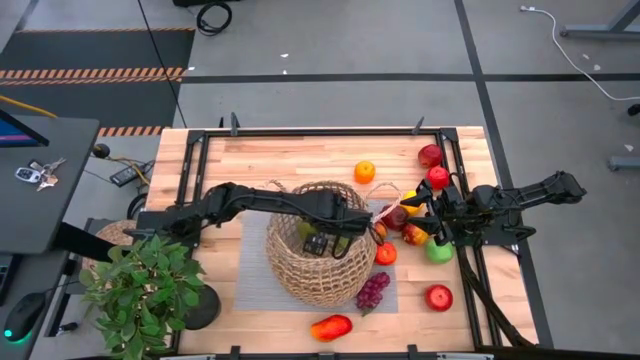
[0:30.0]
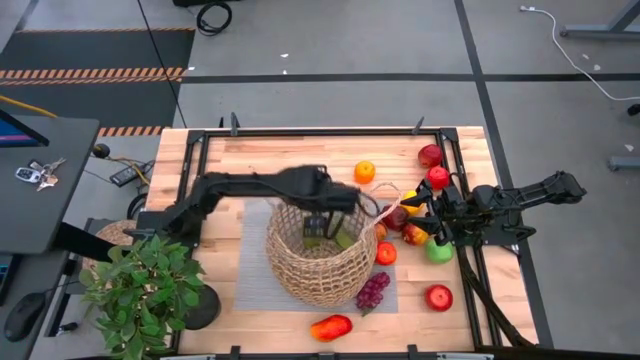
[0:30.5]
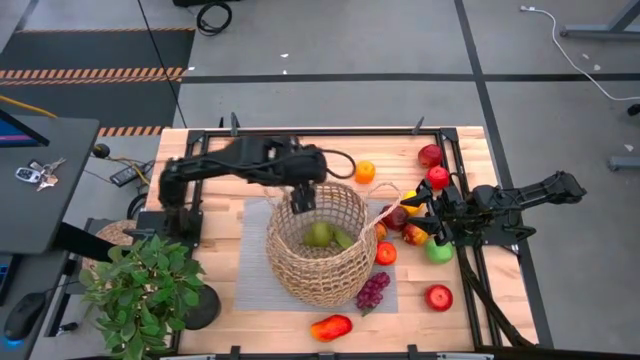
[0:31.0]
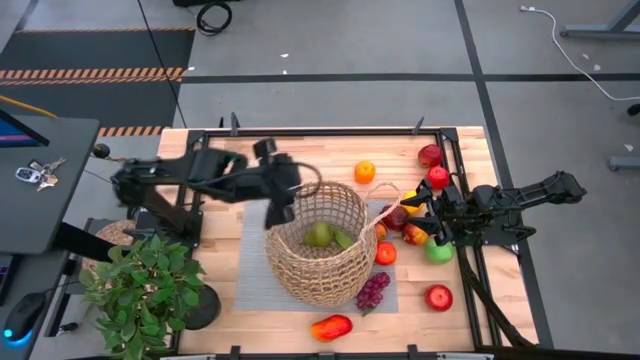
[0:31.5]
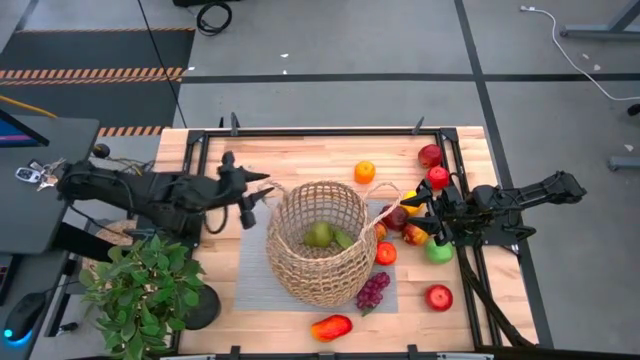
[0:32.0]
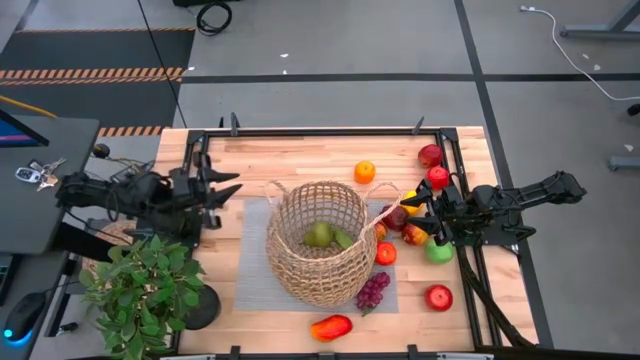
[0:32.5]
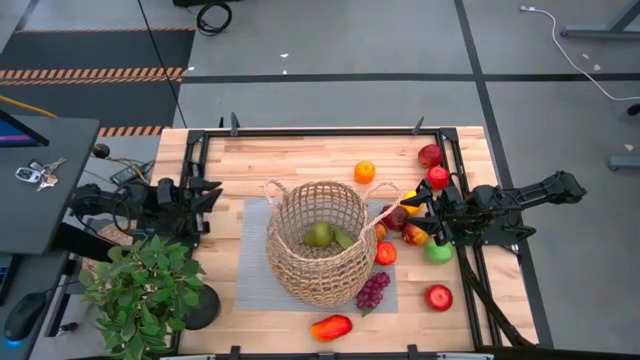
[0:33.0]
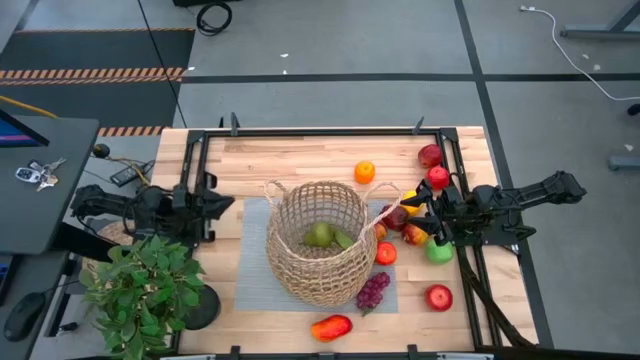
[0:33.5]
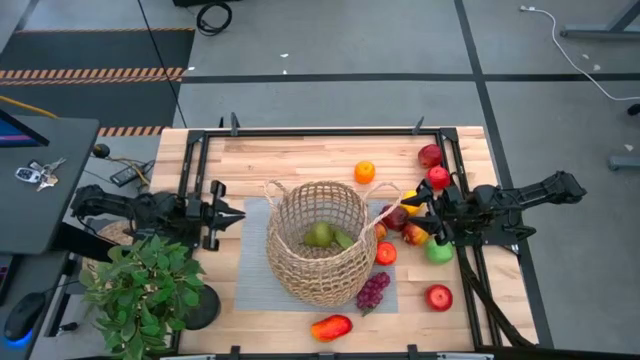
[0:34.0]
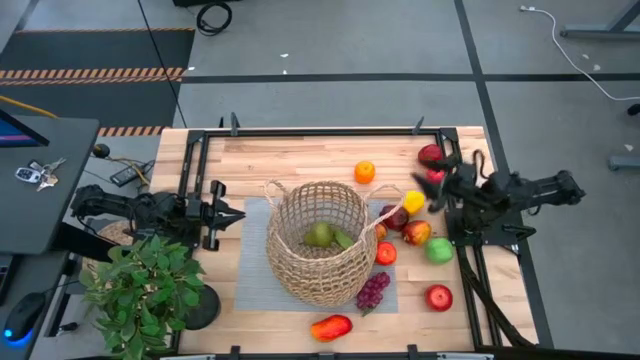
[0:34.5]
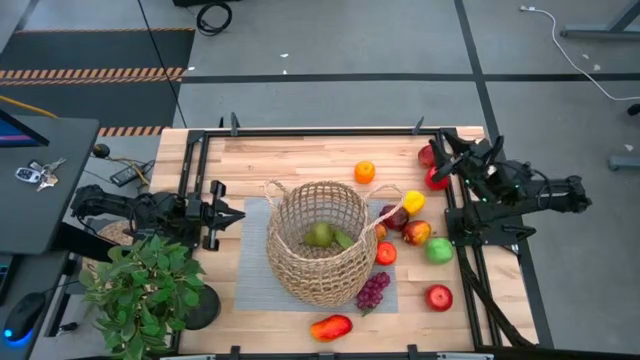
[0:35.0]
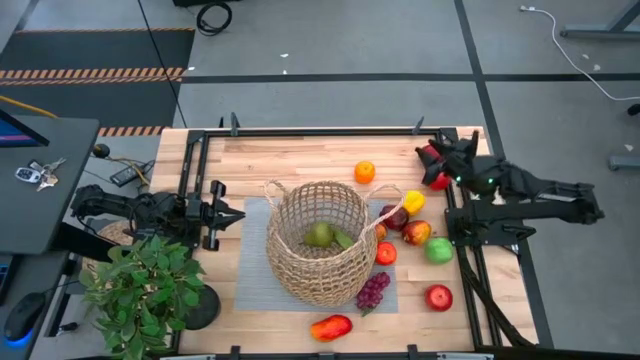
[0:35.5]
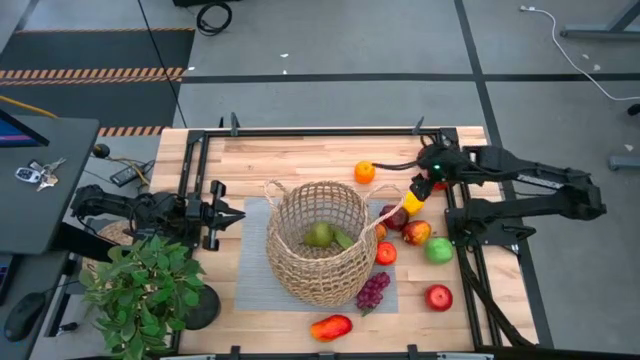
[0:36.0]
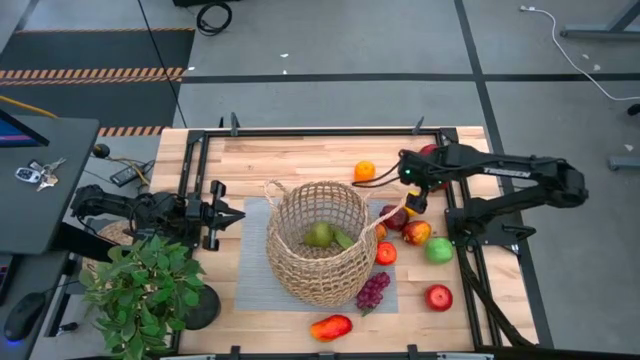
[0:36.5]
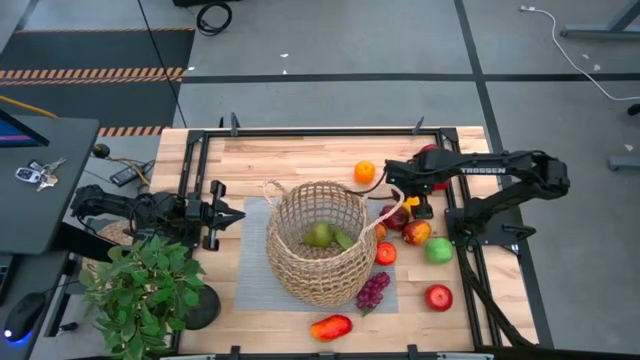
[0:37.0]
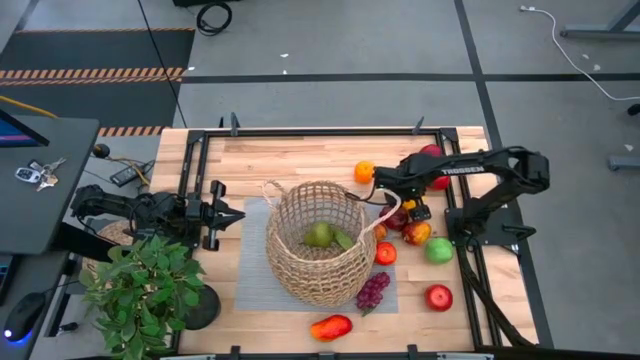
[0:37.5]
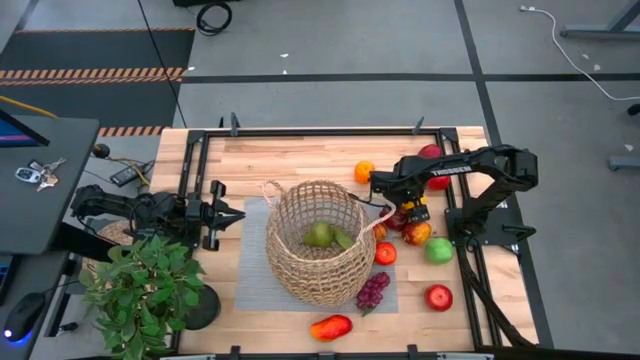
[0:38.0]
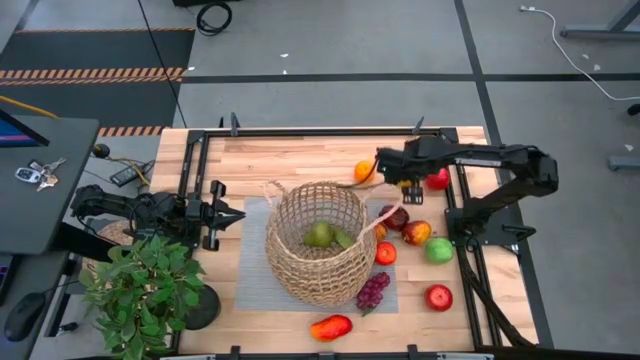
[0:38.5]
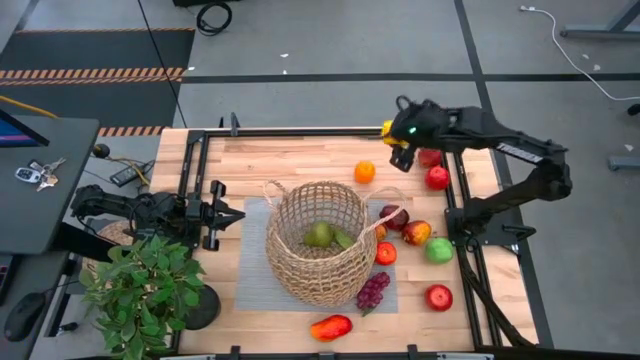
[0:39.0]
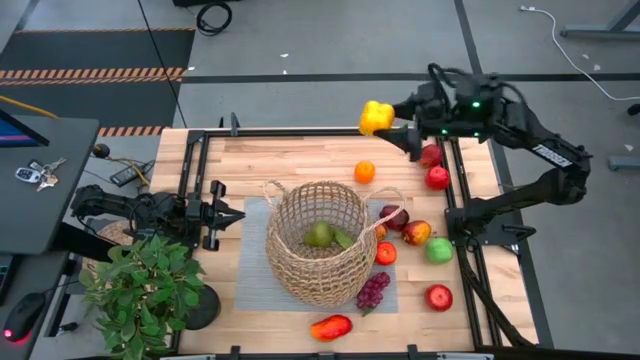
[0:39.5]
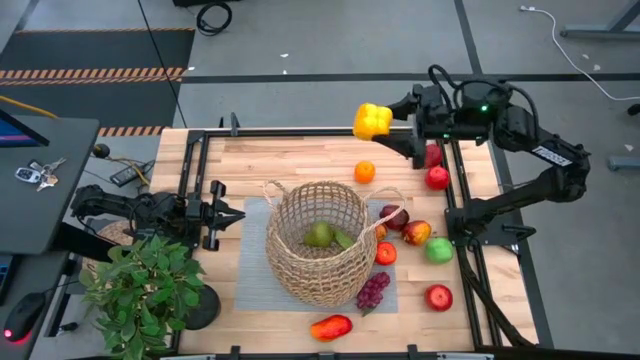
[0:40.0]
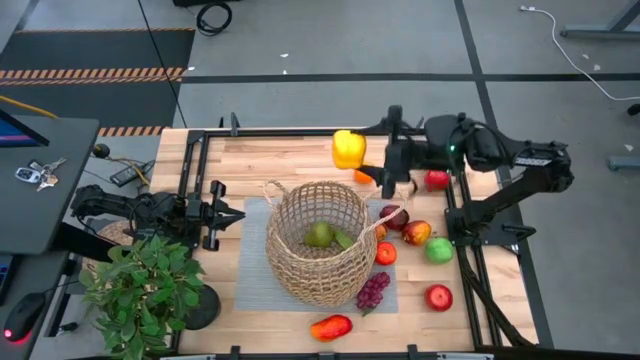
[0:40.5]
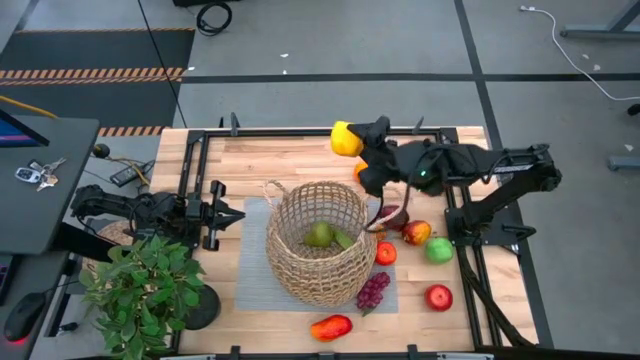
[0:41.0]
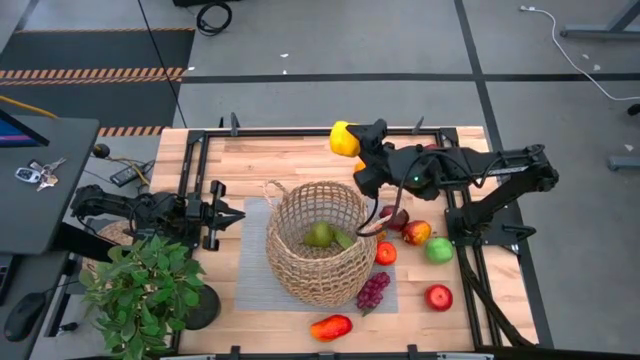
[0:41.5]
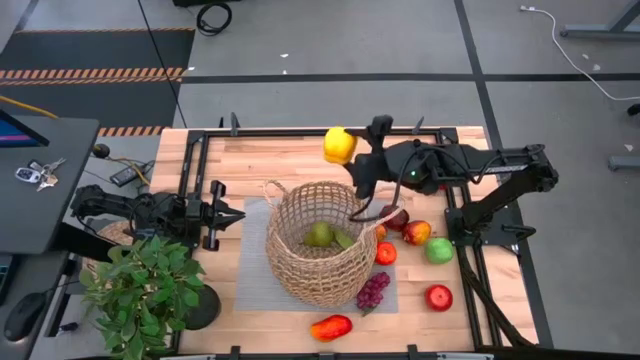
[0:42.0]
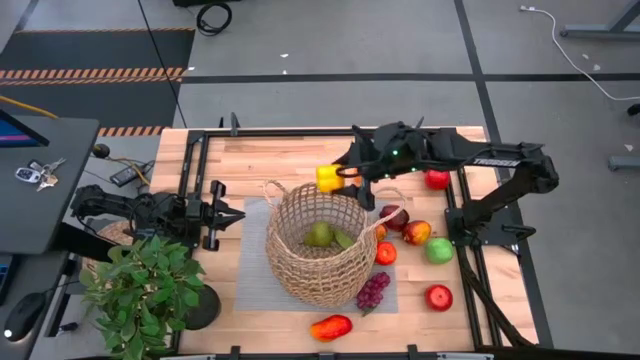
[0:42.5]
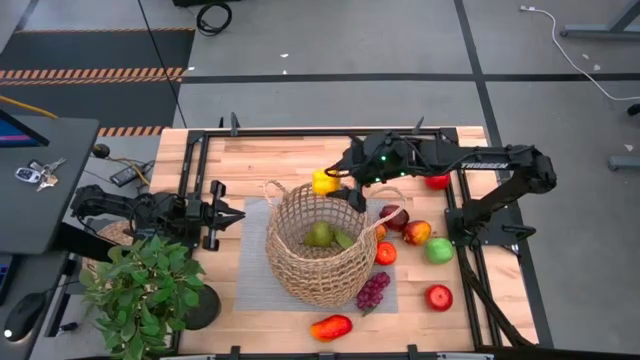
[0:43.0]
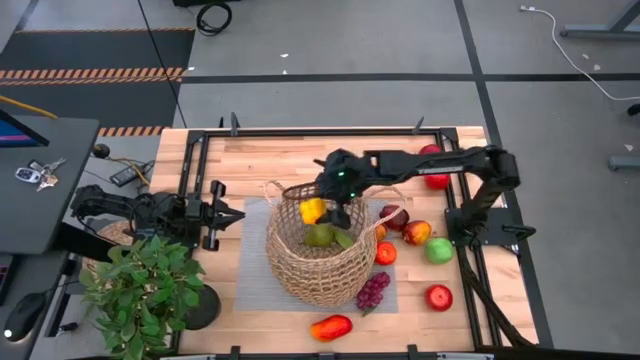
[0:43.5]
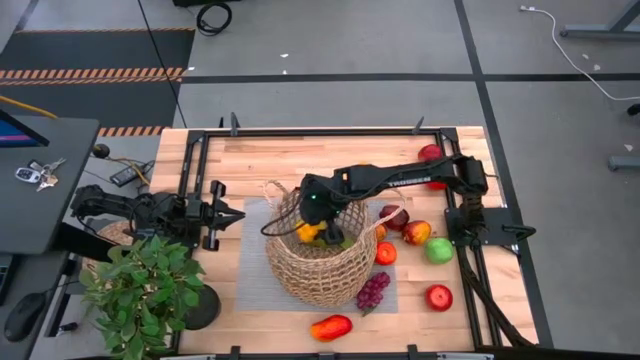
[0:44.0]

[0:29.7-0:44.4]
Task: Build produce basket
Put the yellow bell pepper into the brown basket

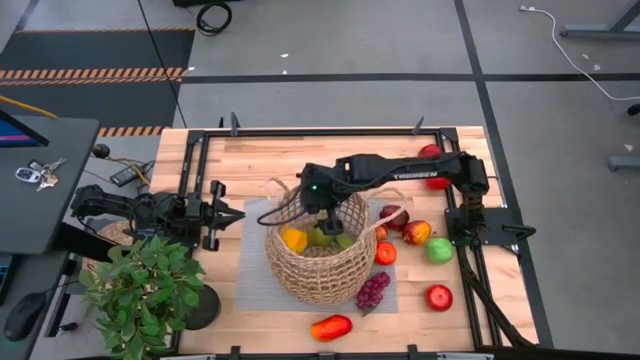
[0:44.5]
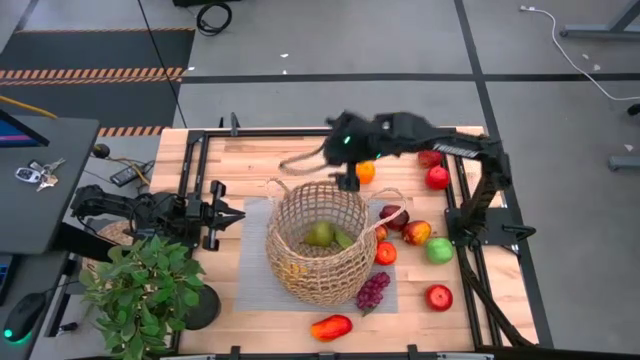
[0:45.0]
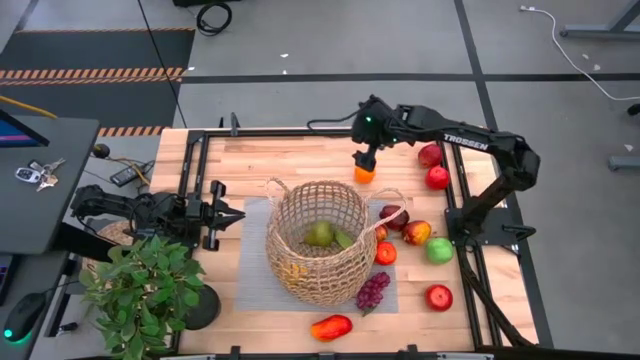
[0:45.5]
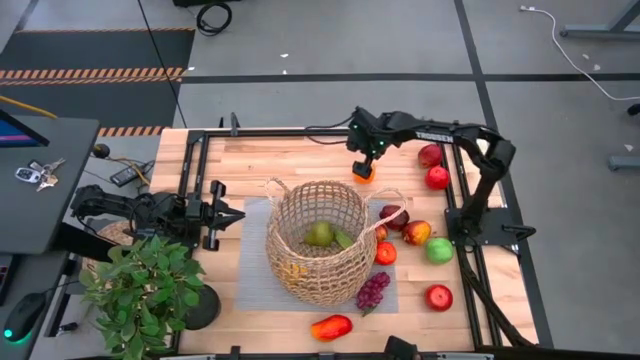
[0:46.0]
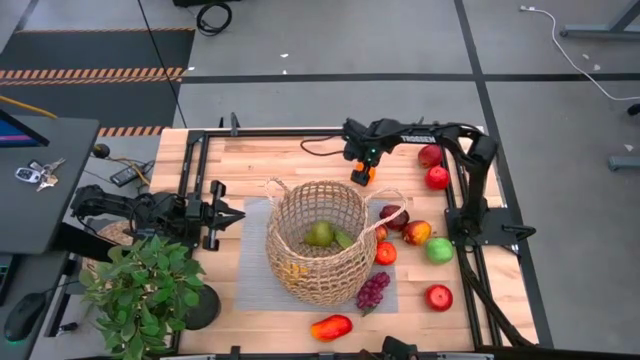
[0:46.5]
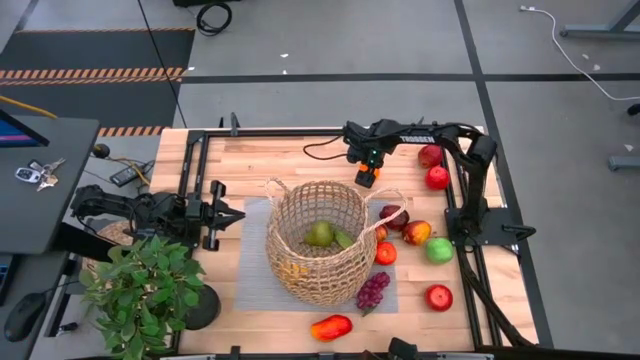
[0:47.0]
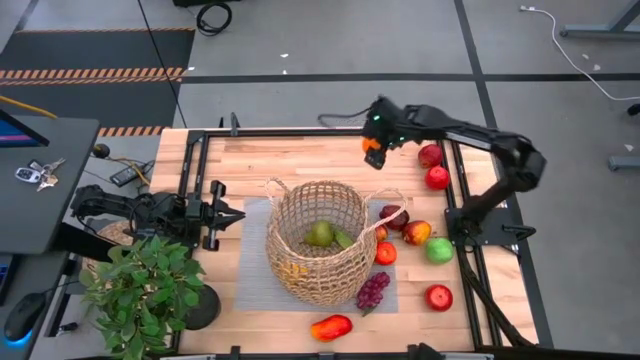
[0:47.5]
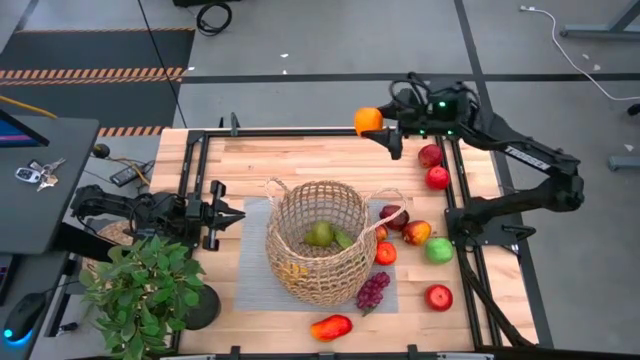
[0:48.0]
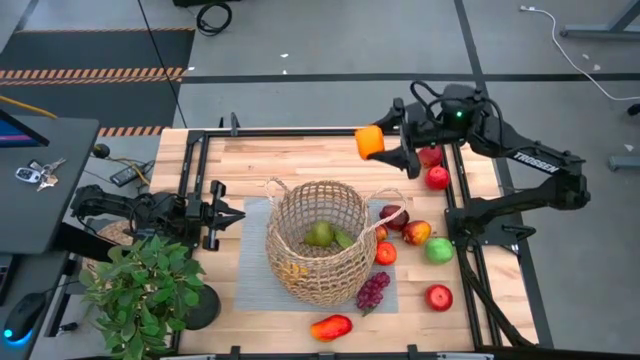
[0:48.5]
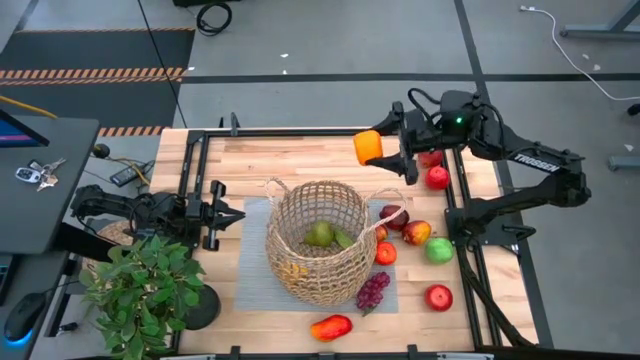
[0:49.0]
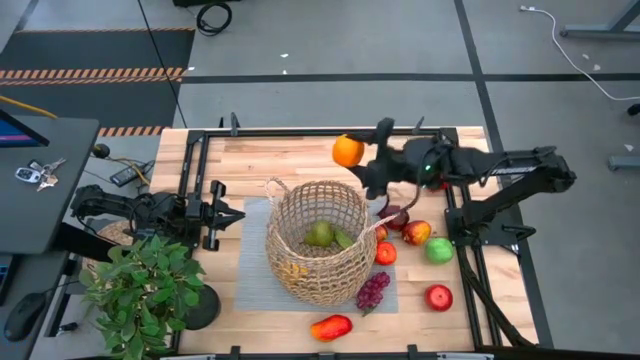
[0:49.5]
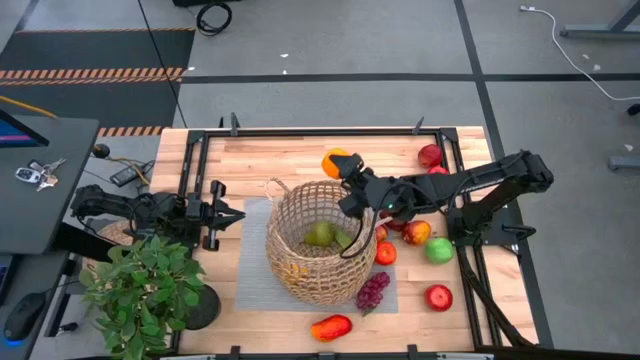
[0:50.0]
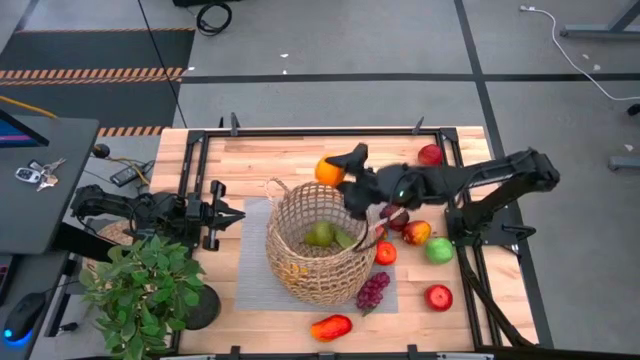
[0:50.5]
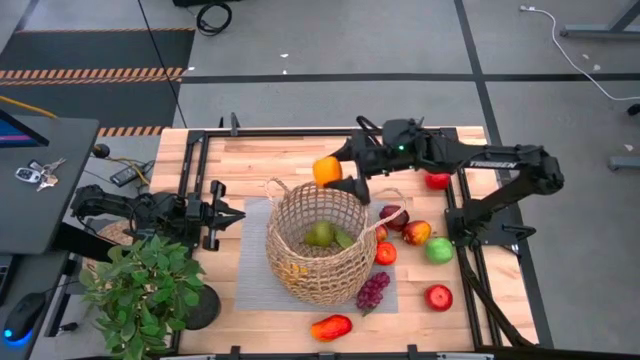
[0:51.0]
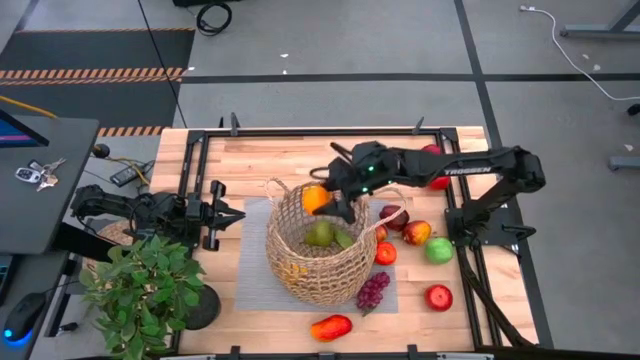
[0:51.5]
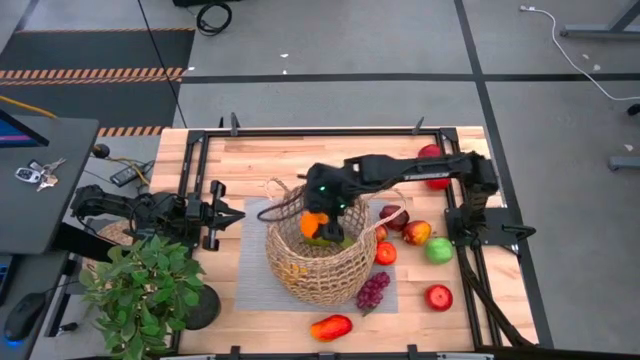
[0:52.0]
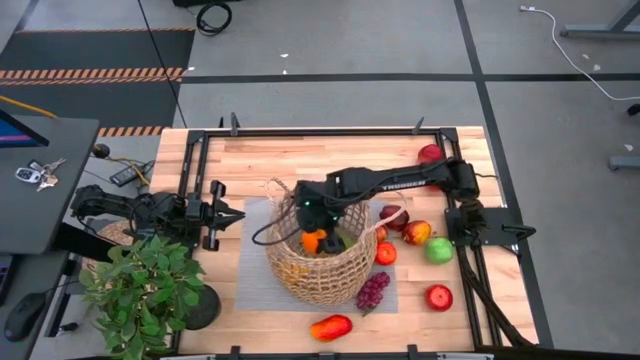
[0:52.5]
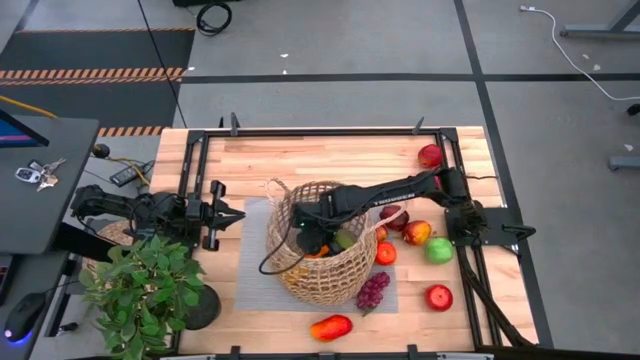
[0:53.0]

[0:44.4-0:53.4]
Put the orange into the brown basket
